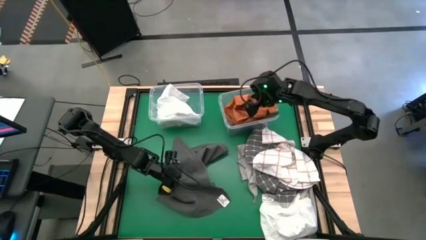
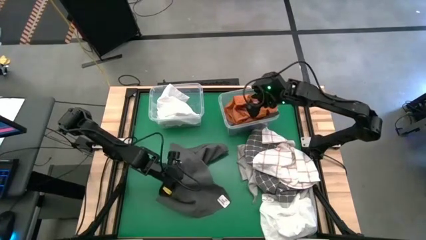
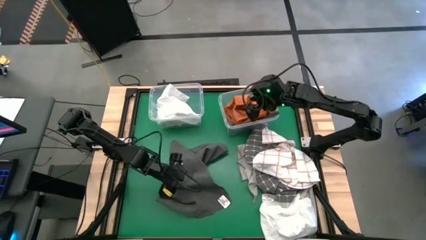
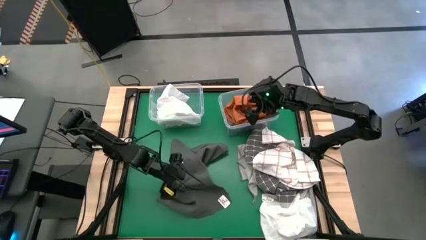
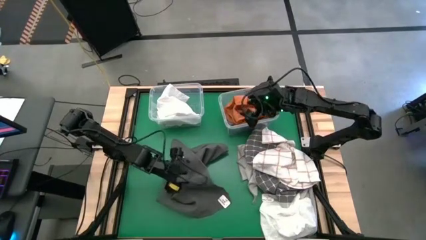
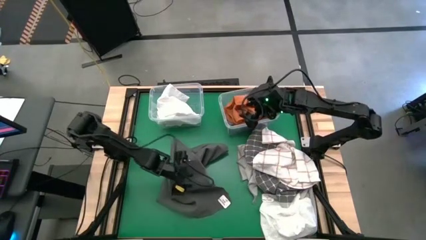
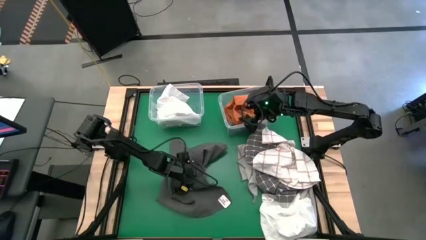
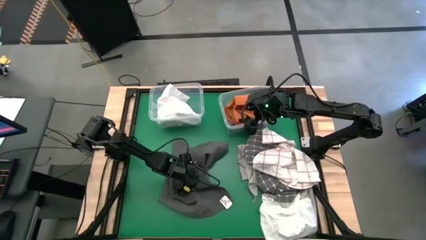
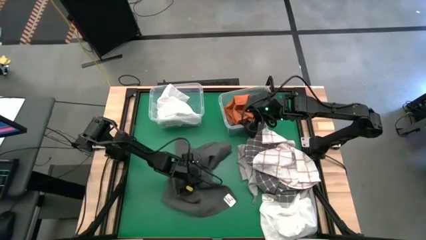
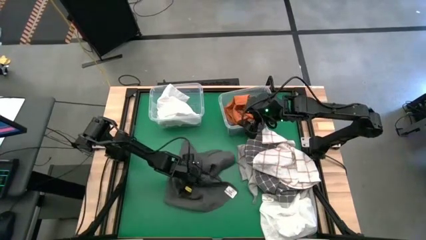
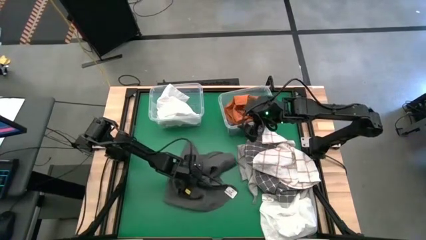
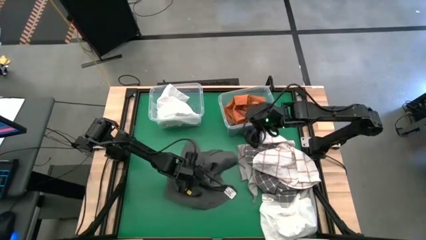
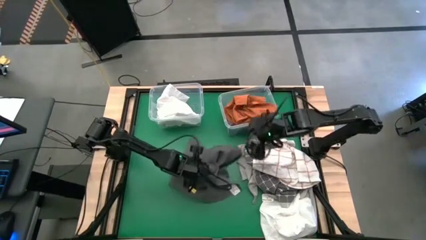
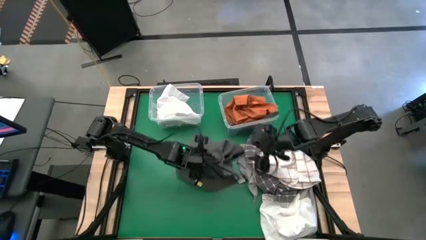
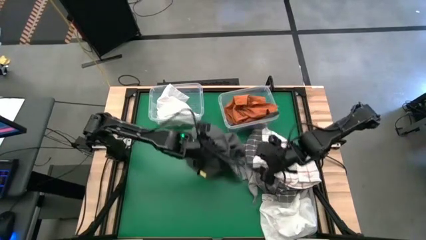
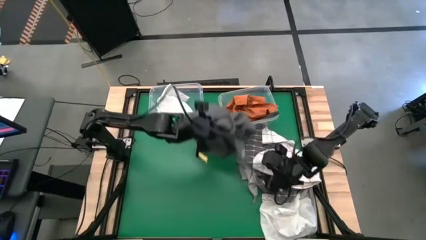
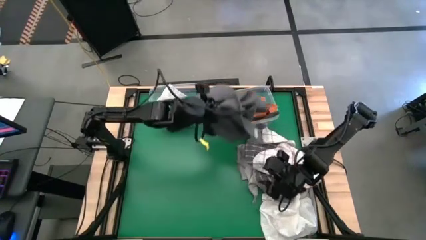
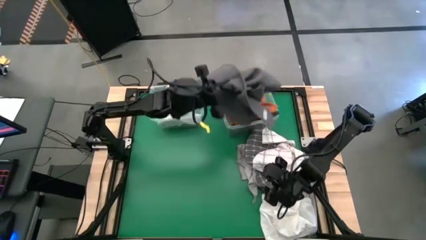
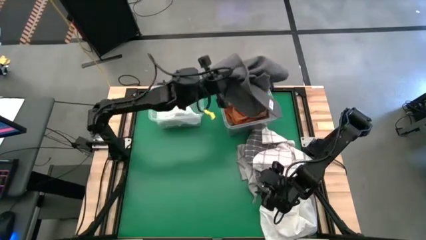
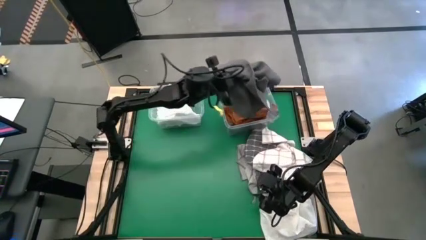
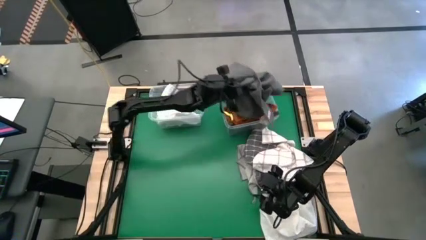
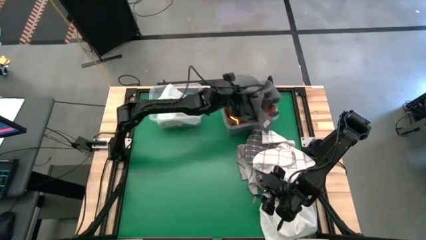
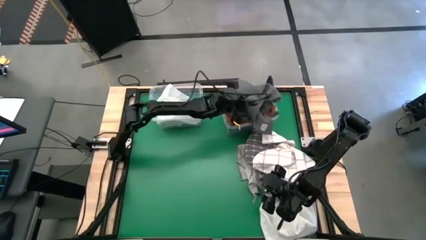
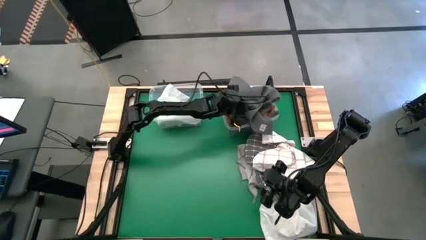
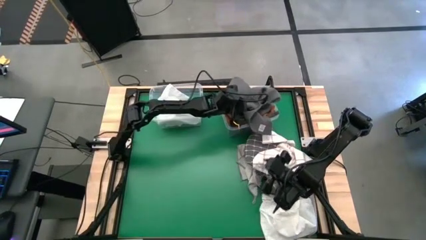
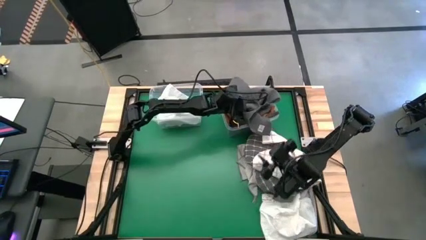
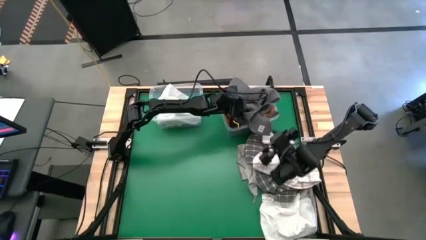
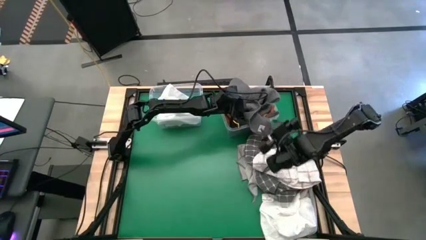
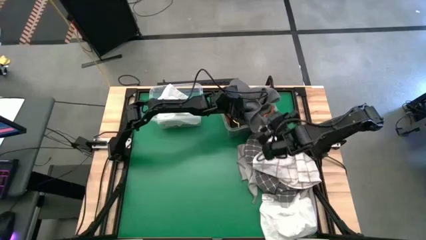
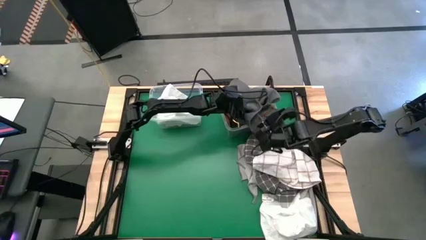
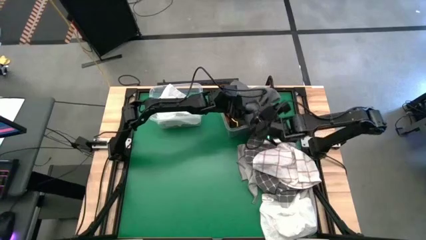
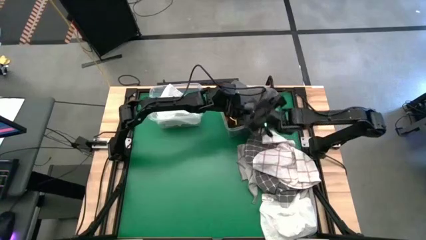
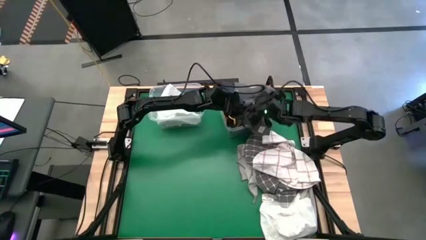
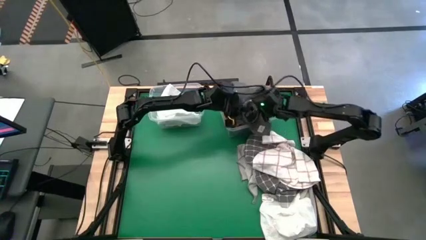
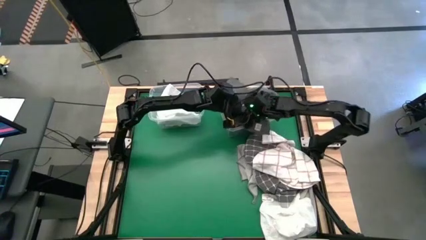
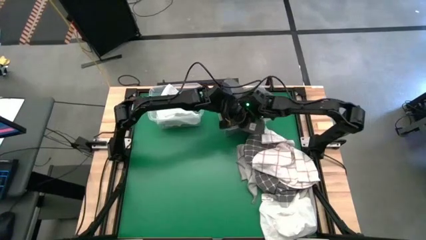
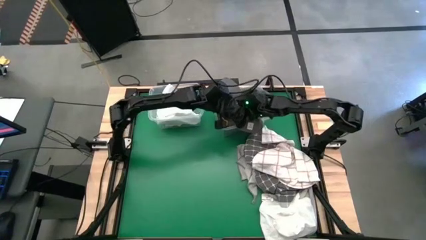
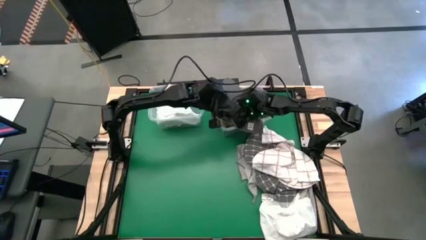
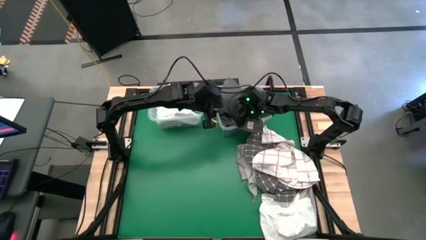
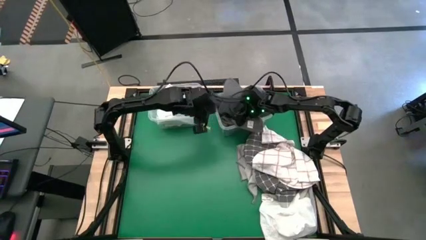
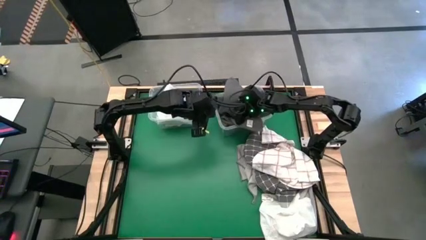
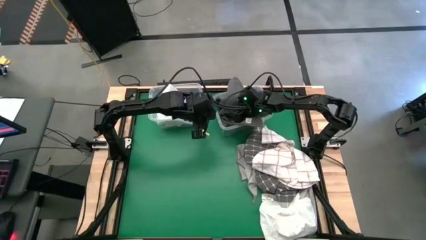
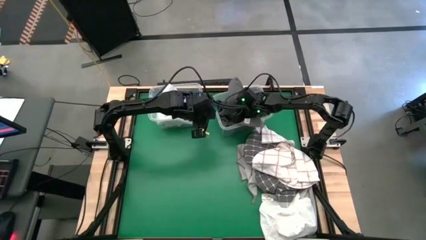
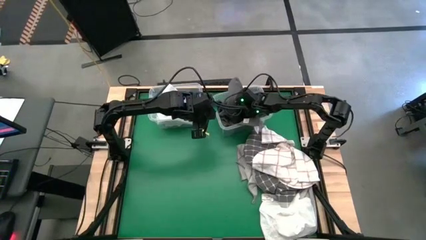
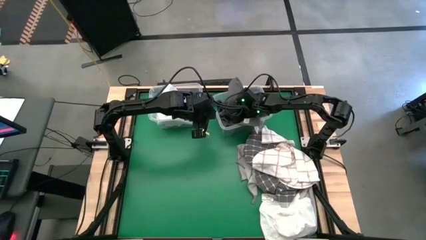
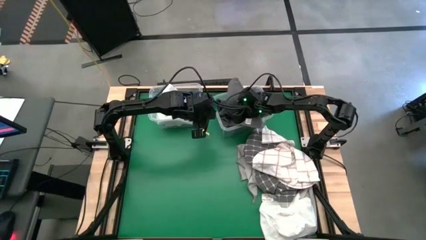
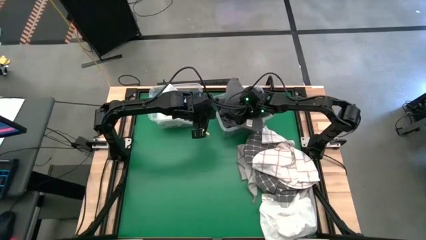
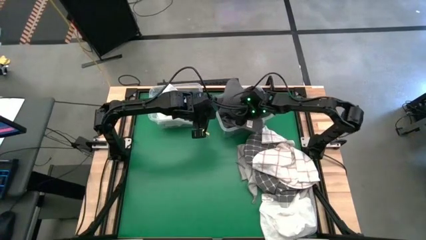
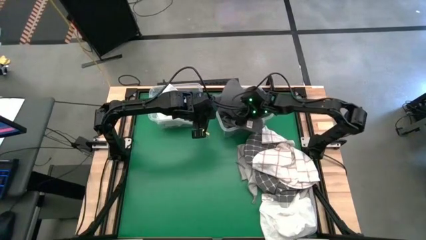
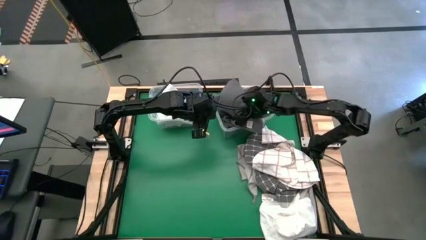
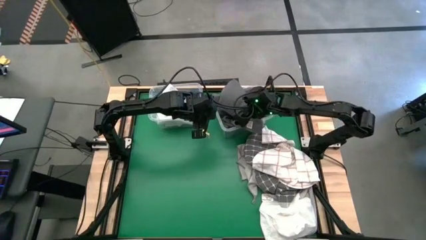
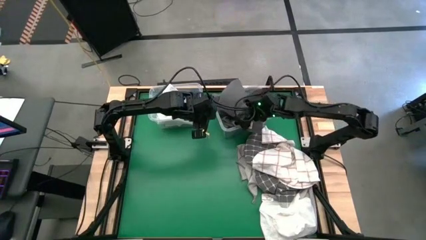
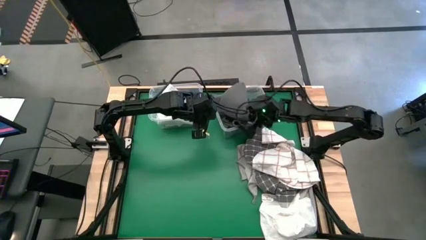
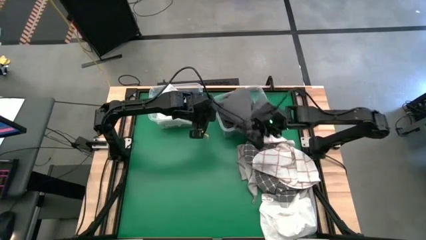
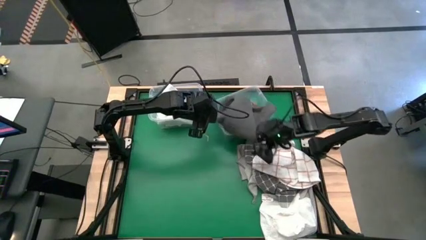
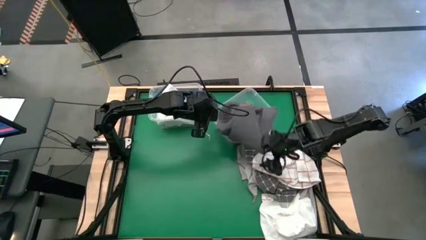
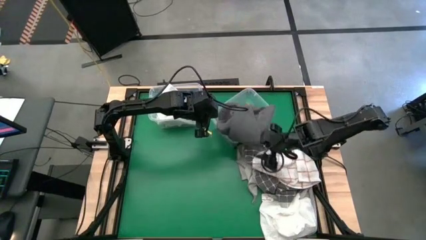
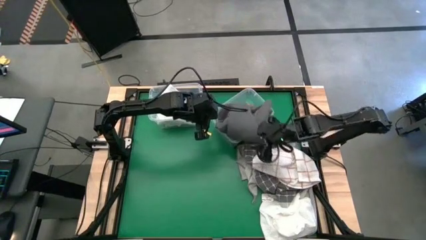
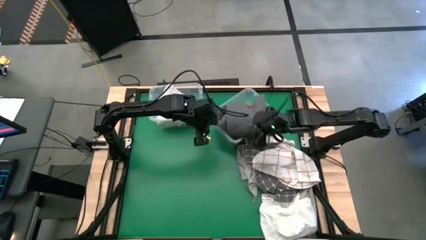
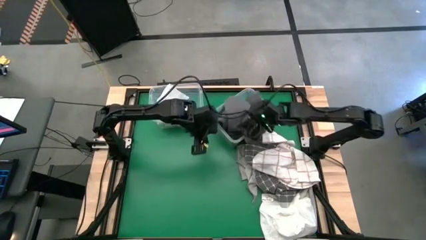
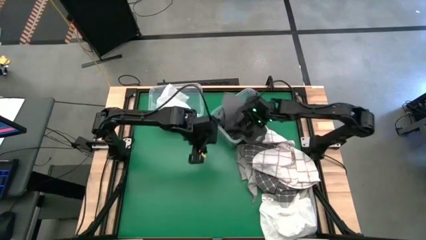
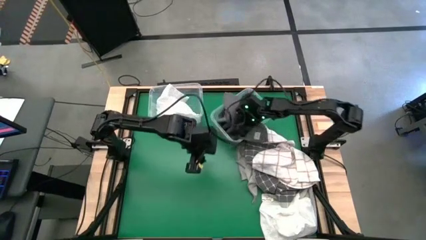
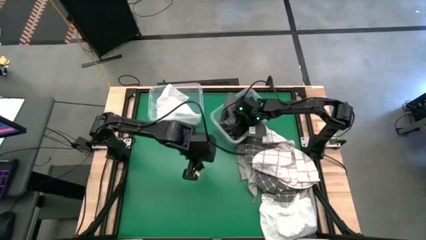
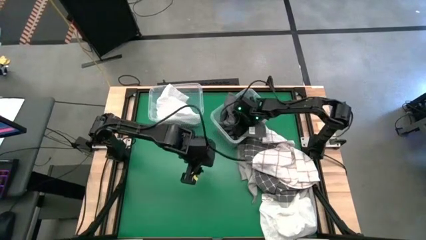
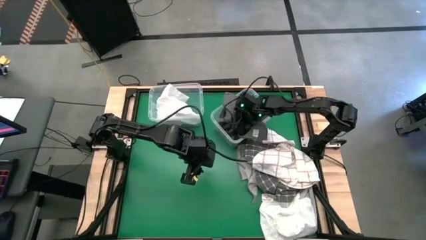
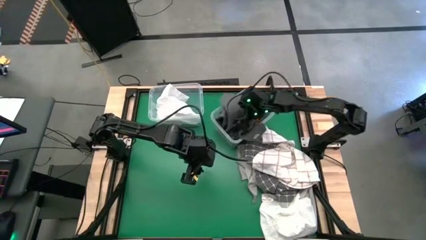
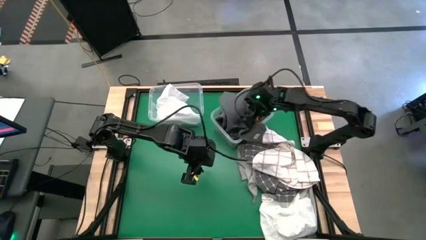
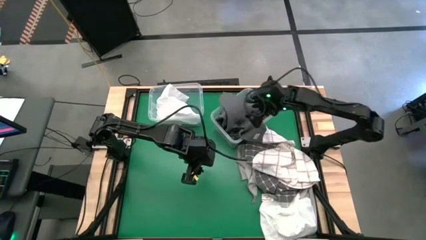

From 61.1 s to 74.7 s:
Task: Sort towels by color in basket
Put the gray towel into the right transparent bin
